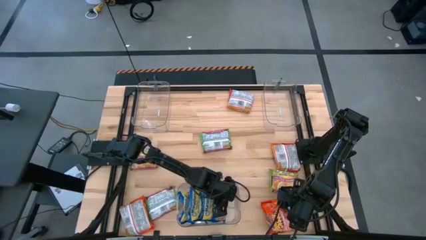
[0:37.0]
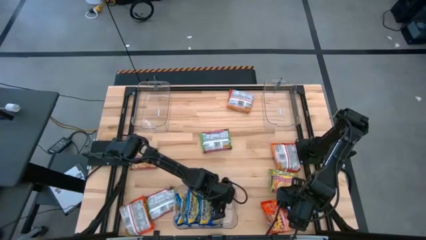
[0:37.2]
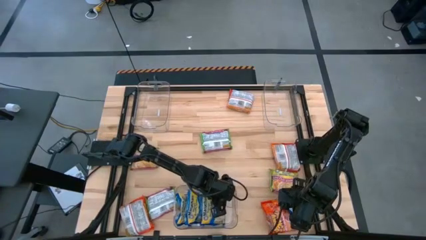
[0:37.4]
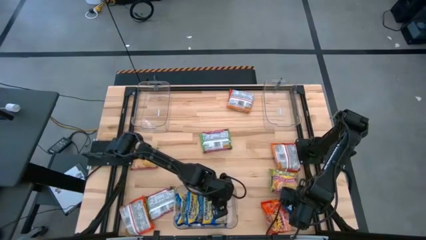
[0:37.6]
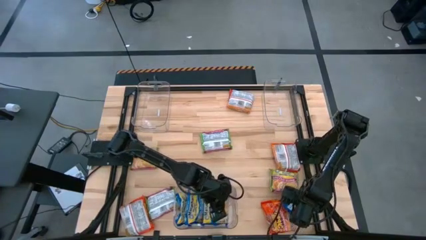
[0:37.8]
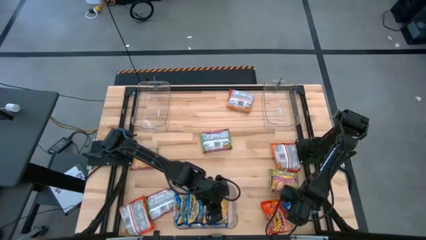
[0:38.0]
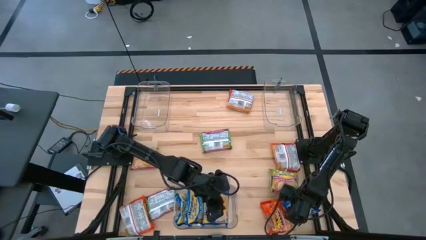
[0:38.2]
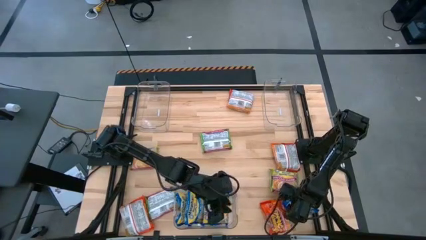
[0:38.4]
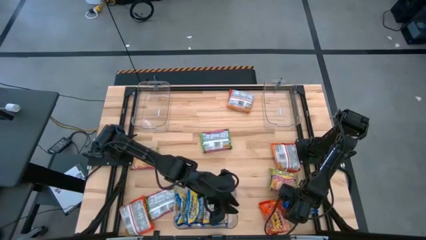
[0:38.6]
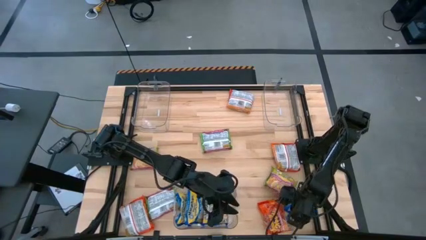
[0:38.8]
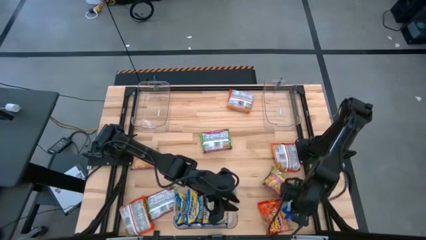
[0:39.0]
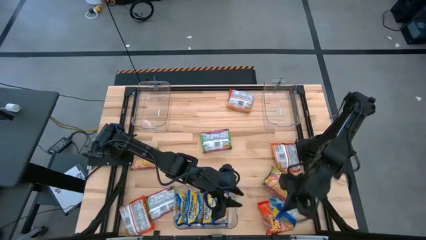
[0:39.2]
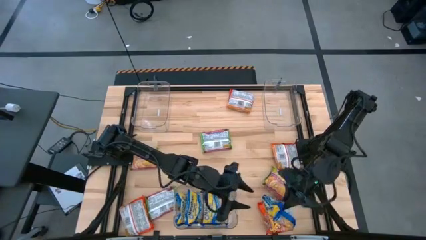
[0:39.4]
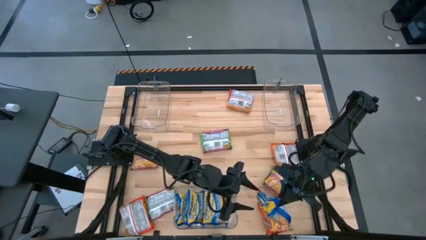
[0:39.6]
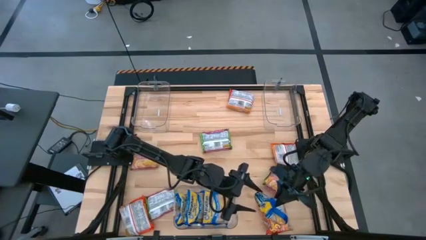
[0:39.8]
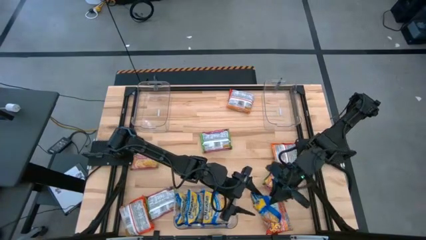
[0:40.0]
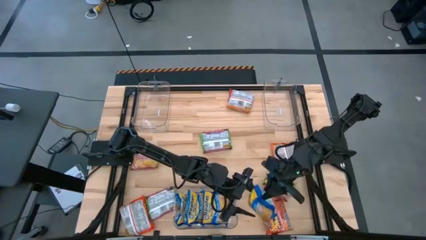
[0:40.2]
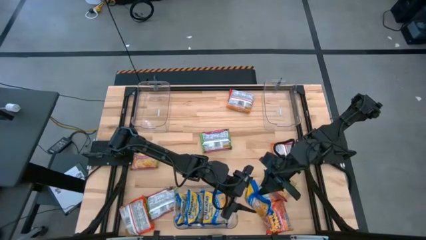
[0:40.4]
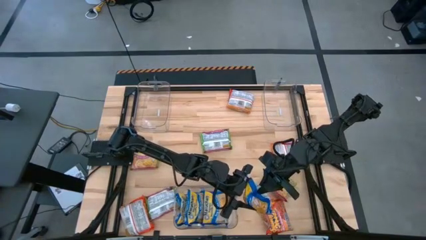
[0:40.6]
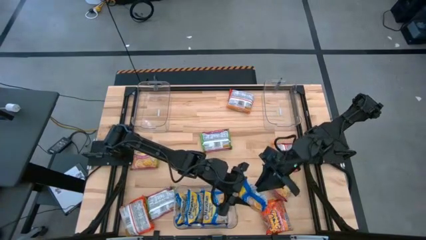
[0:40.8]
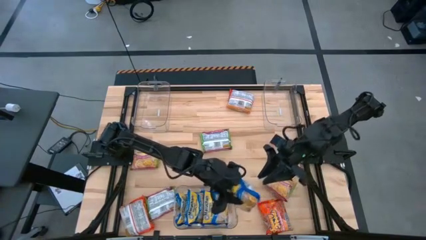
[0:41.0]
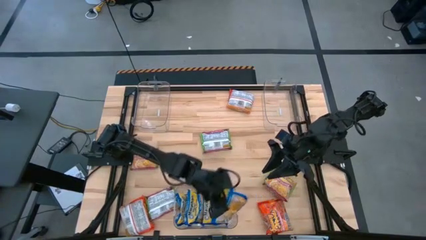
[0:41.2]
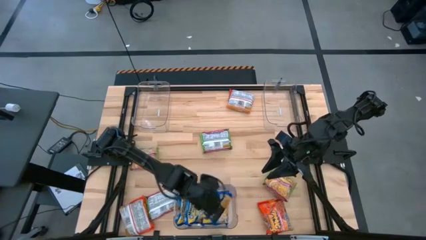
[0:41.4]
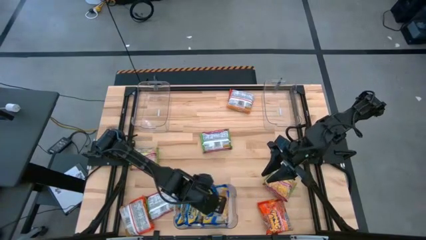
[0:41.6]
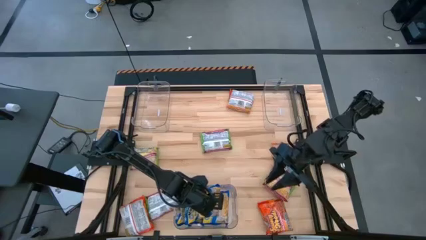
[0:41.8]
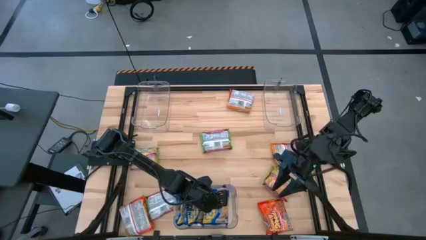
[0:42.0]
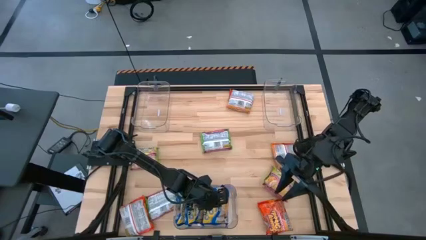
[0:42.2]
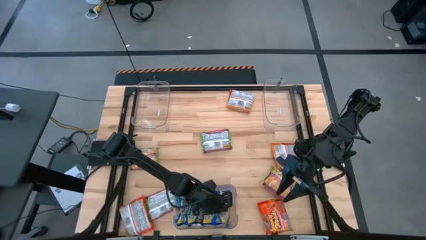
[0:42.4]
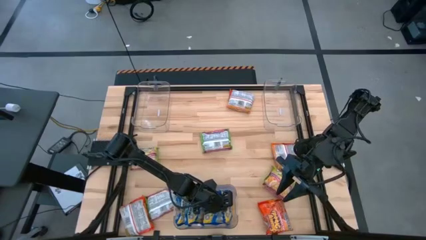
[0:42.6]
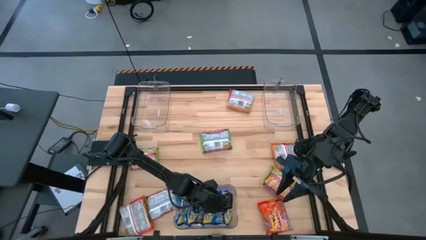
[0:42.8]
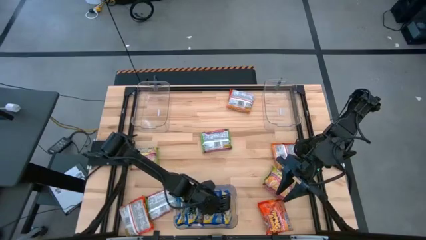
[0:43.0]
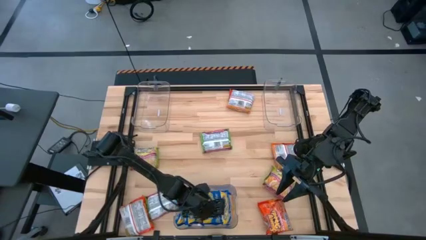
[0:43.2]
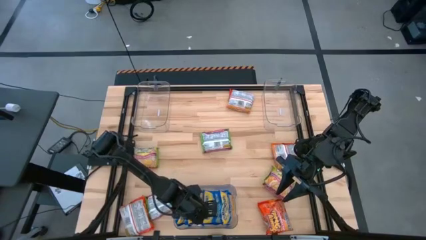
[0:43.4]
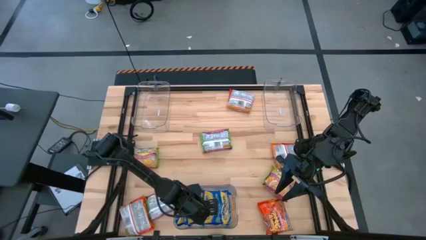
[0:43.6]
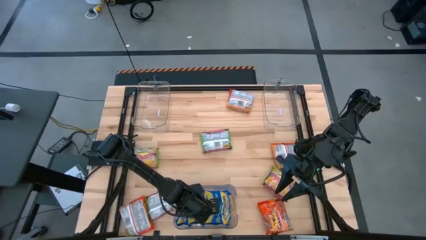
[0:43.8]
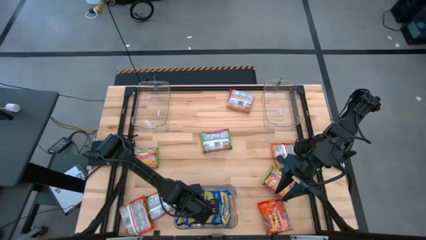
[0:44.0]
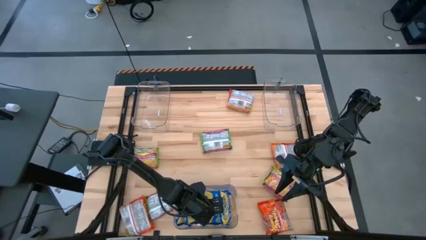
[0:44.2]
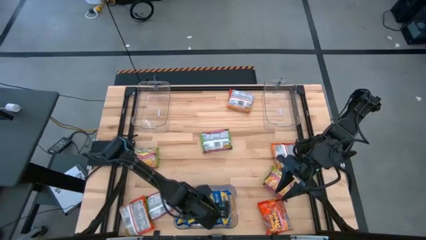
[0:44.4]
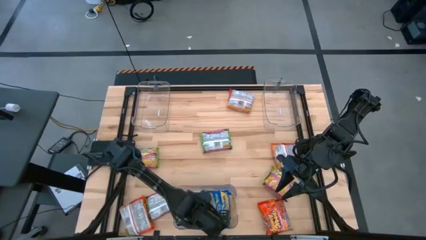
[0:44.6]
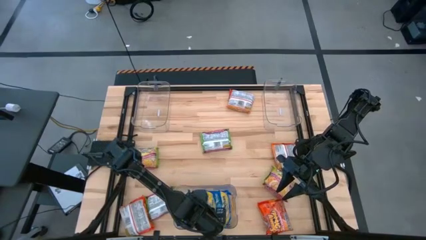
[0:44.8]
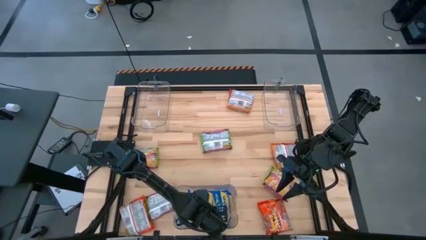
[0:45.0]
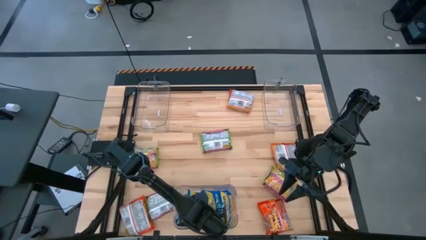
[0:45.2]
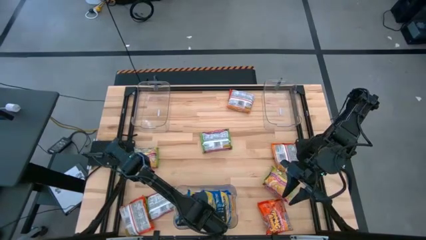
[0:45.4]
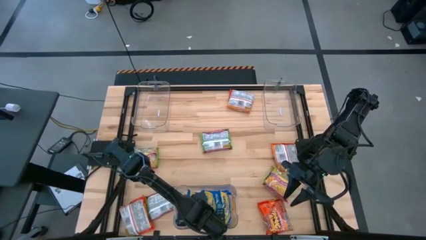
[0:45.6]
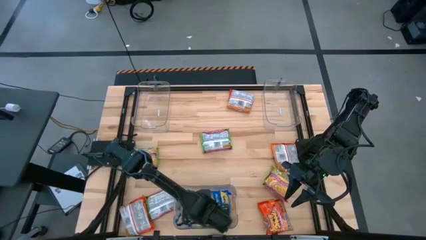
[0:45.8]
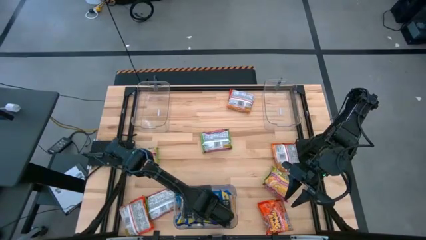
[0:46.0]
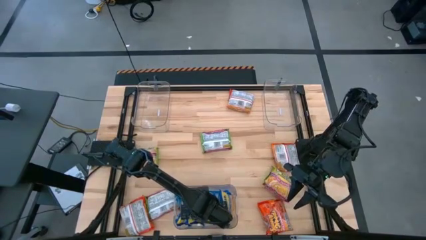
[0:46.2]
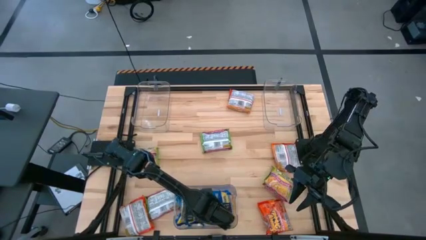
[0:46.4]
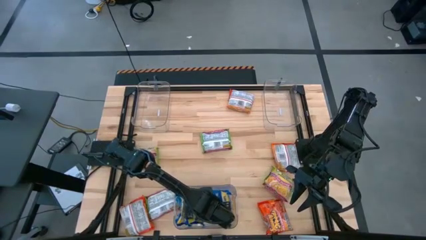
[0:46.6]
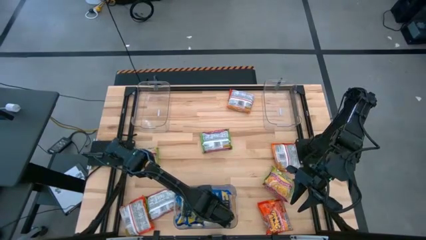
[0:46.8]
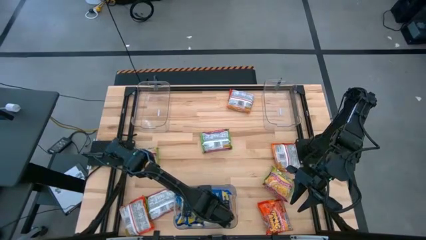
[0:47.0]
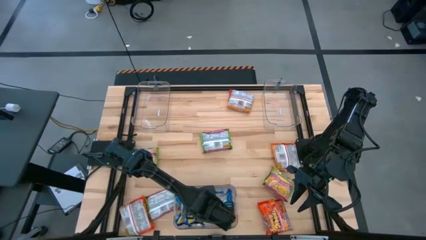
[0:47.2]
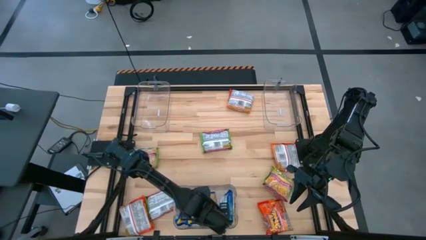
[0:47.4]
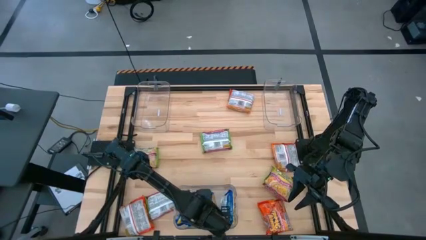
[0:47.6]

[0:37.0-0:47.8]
Task: Sort Maruchan noodles
Put the blue noodle pack into the bottom transparent bin

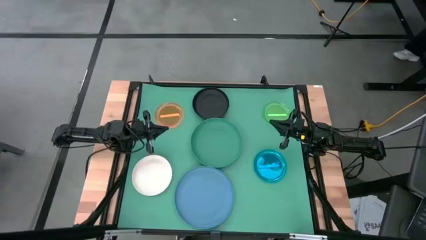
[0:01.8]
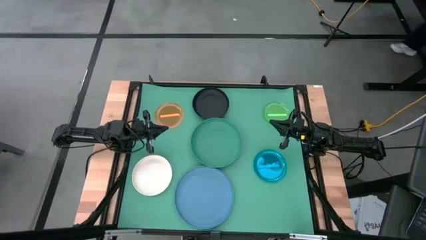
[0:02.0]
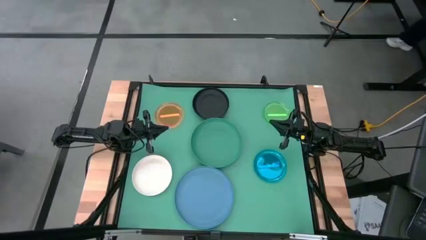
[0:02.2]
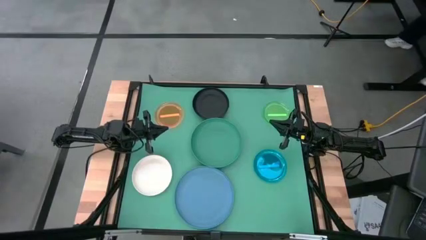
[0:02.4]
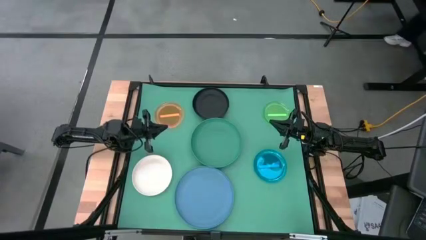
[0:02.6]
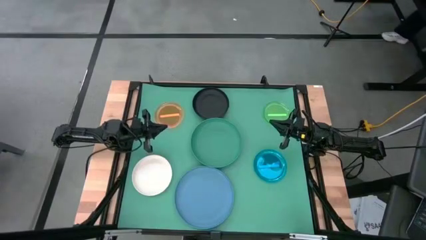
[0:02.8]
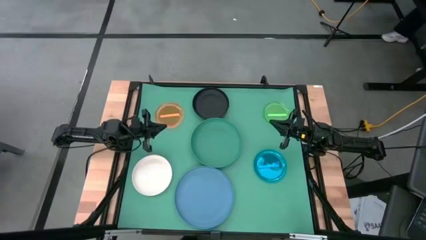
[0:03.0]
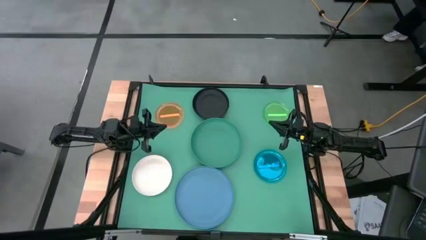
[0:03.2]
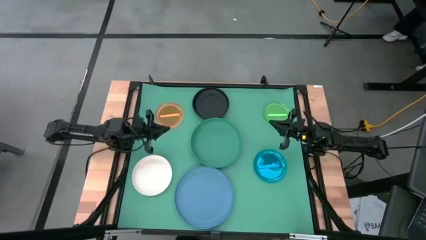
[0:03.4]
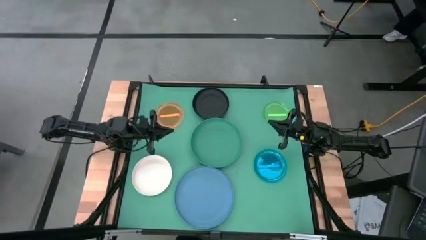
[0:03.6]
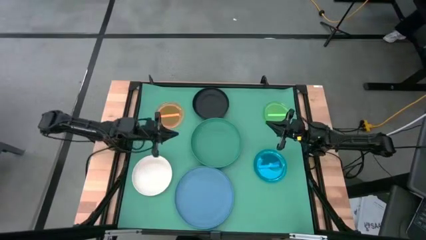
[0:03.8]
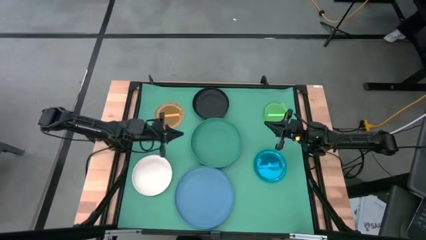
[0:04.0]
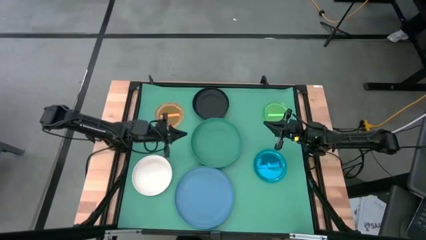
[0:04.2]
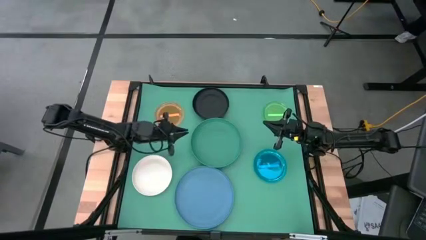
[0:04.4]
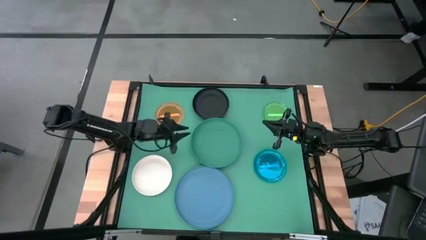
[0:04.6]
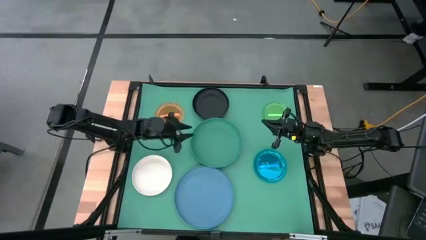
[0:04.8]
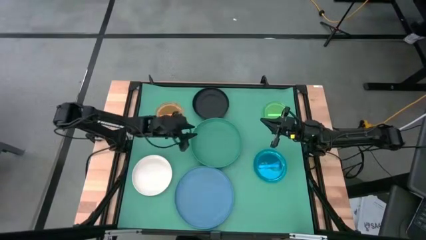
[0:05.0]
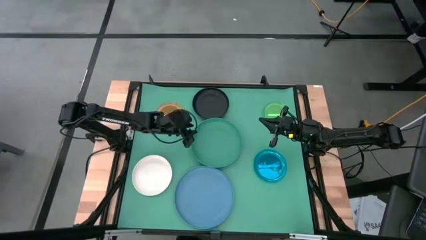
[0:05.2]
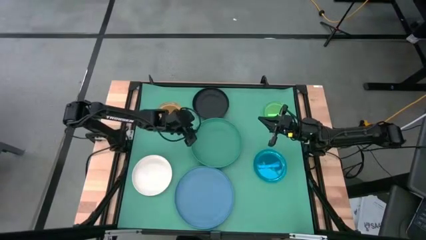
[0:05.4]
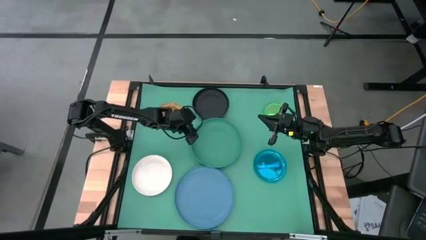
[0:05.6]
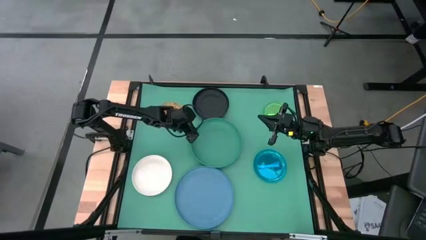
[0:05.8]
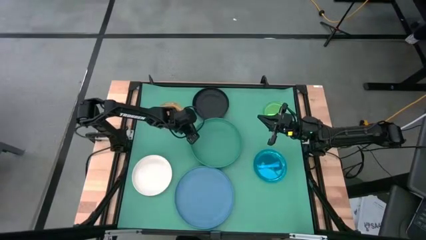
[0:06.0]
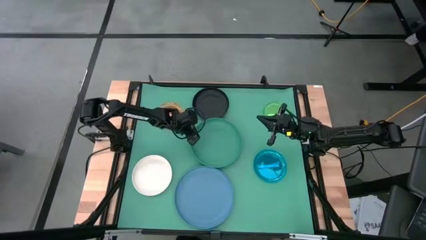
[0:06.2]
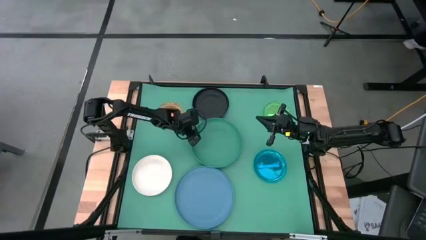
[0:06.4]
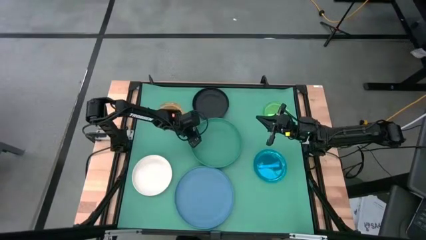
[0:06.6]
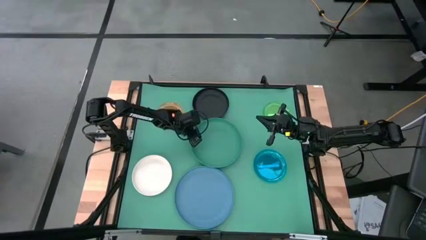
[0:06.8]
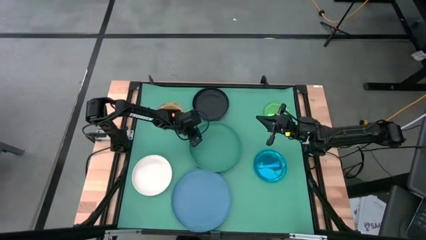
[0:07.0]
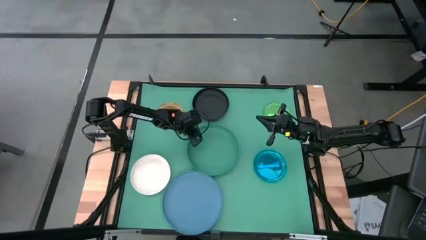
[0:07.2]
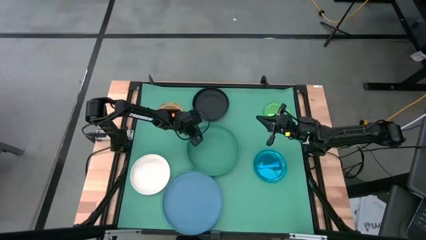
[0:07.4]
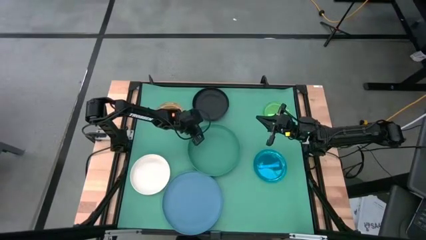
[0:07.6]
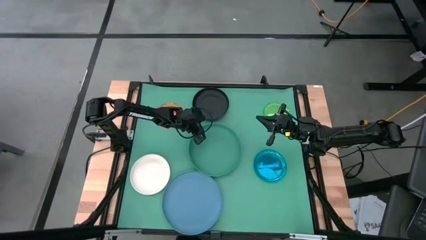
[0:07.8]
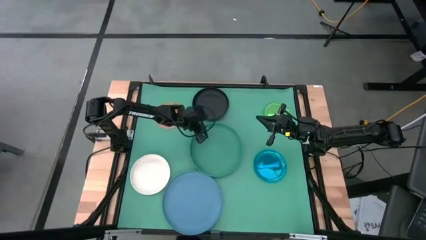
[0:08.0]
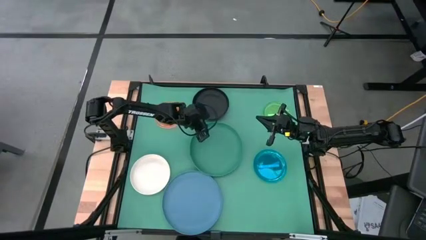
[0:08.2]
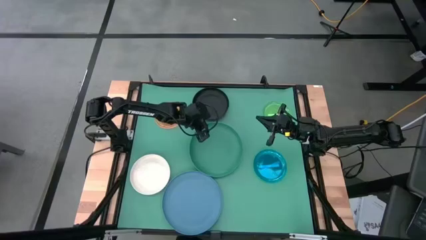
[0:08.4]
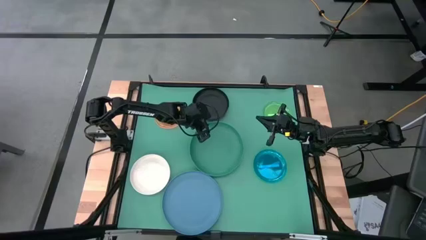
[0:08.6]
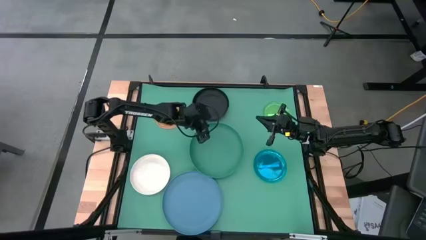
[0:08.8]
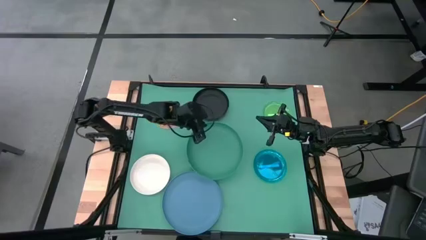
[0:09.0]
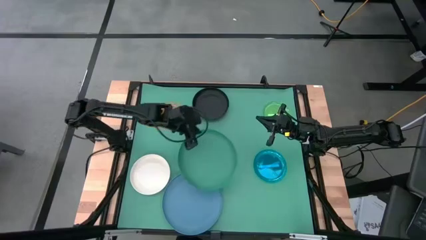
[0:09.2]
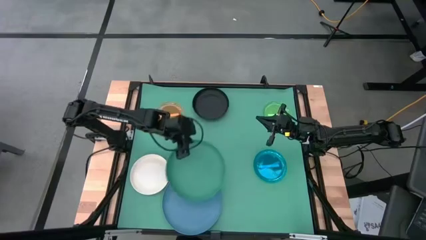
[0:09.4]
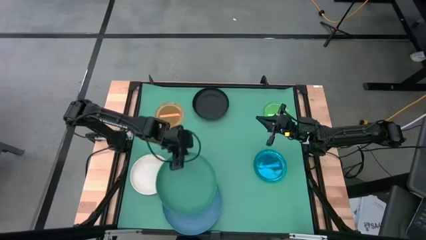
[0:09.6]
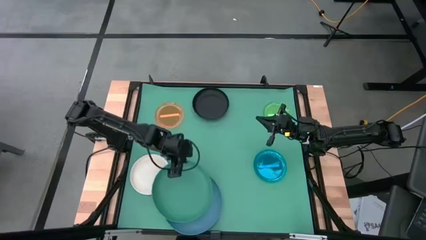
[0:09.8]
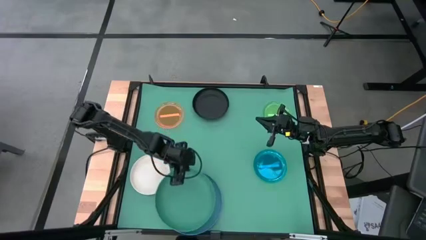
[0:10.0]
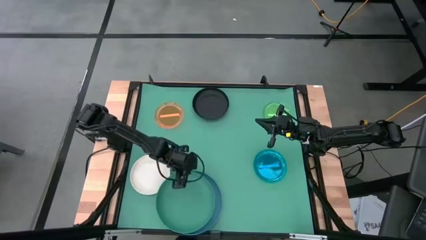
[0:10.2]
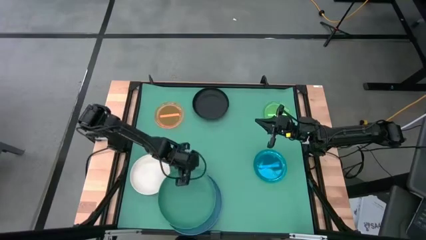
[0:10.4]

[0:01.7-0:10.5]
Task: Stack plastic plates
Stack the green plate on top of the blue plate
